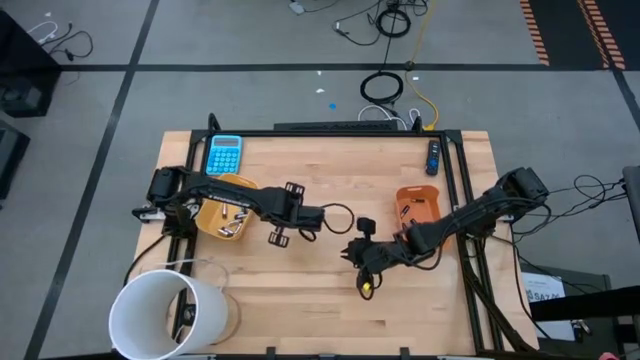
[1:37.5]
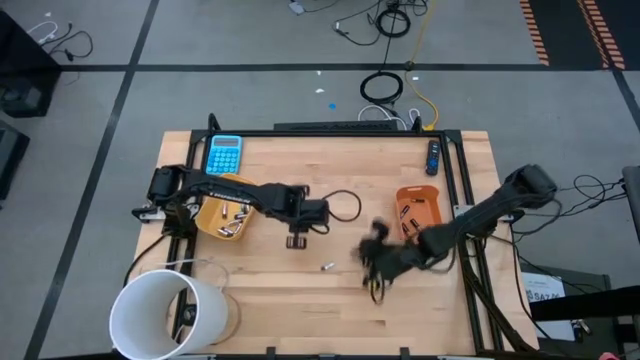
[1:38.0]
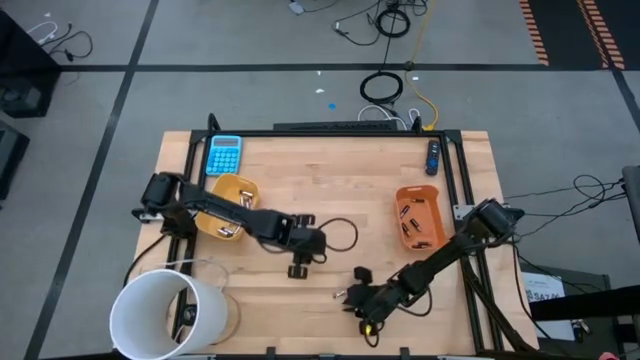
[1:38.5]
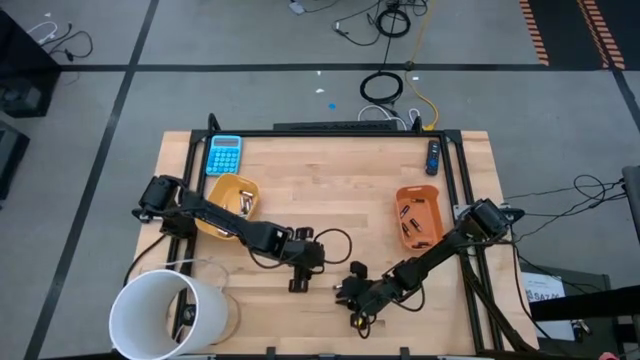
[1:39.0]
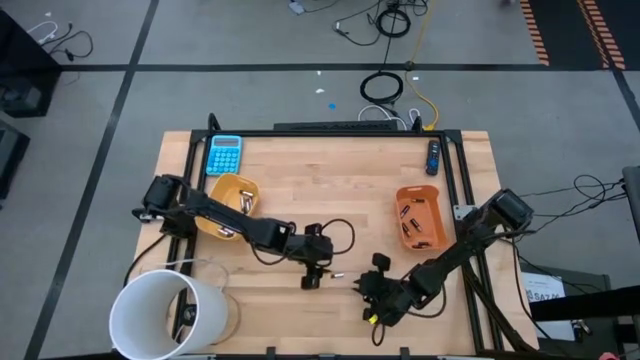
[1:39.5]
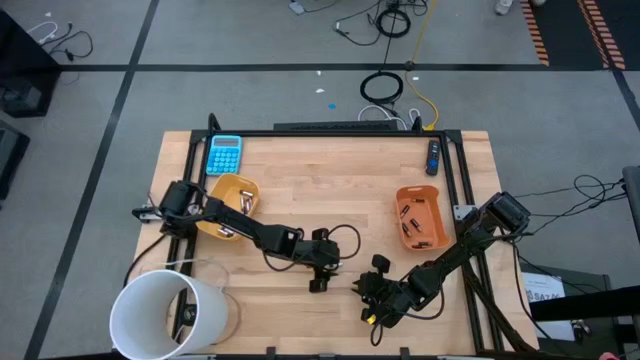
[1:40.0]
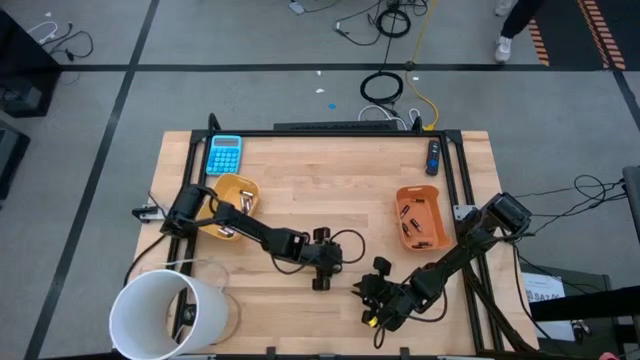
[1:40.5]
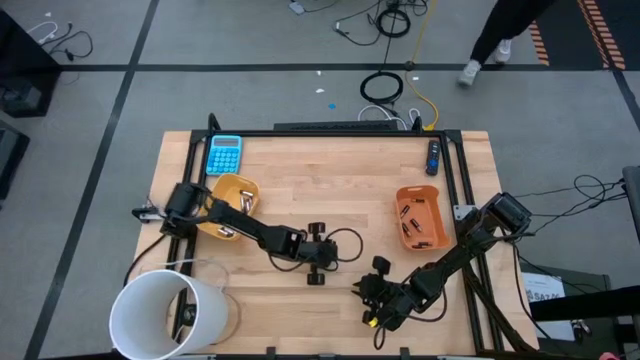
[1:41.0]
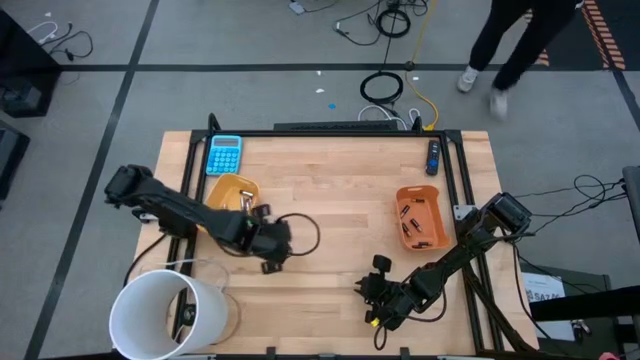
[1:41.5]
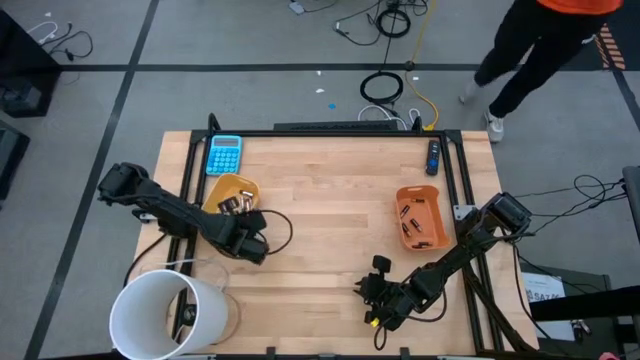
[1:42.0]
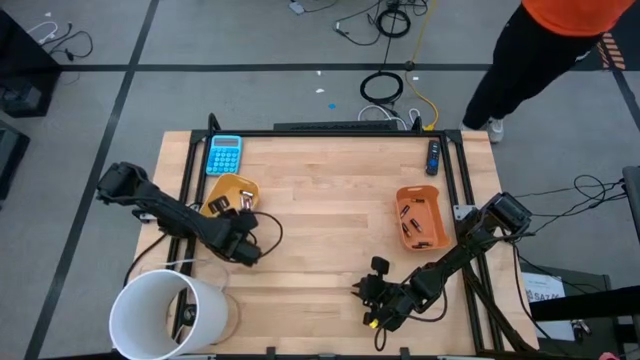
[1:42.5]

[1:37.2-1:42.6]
Task: Sort batteries
Put the silver battery into the yellow bin

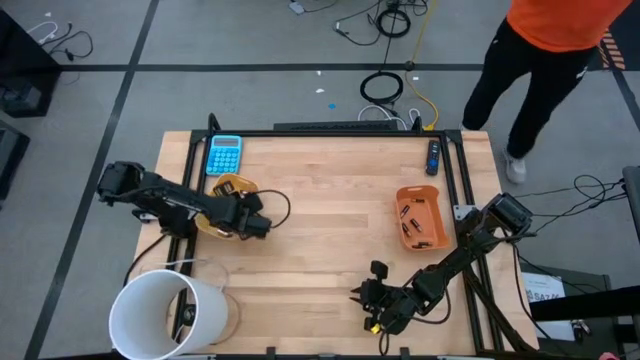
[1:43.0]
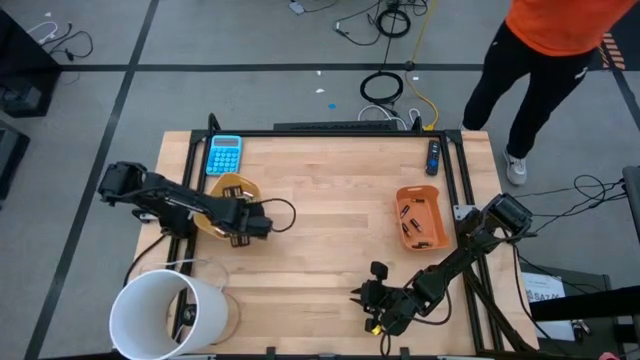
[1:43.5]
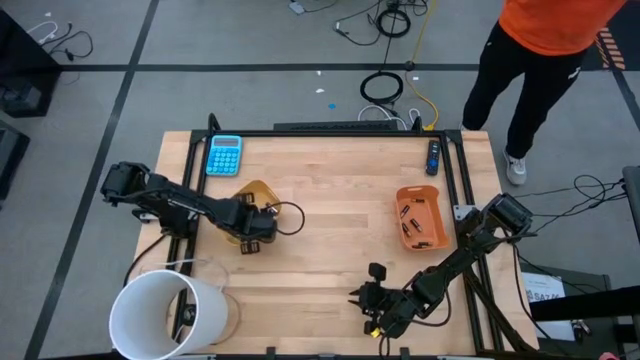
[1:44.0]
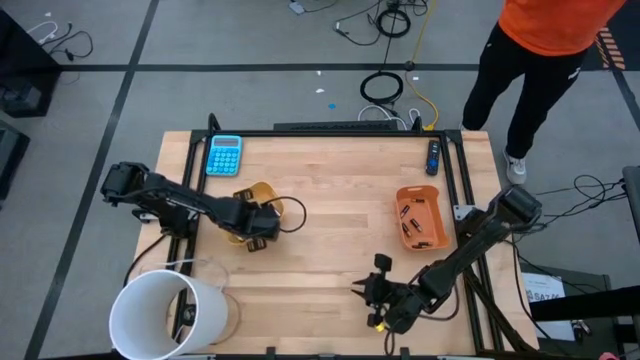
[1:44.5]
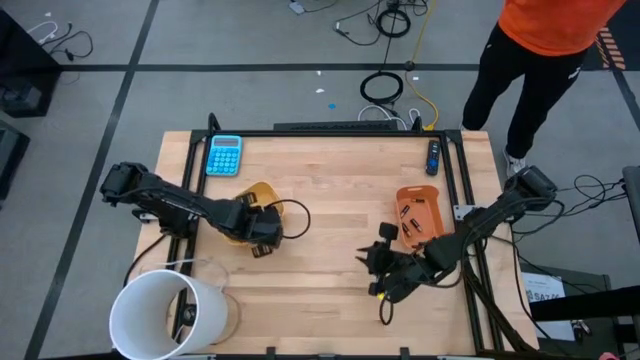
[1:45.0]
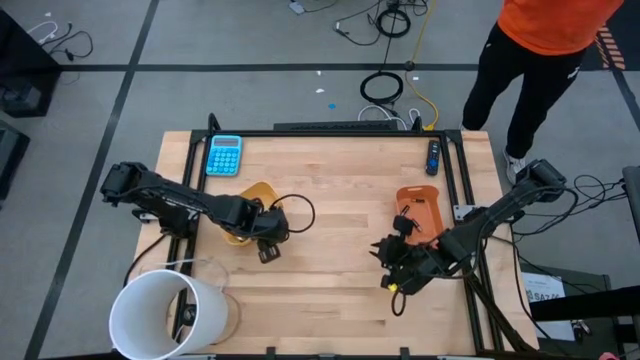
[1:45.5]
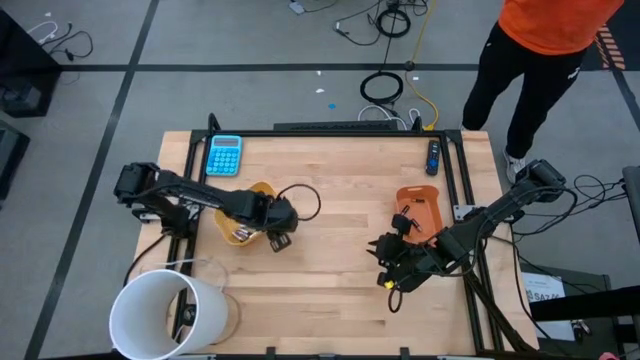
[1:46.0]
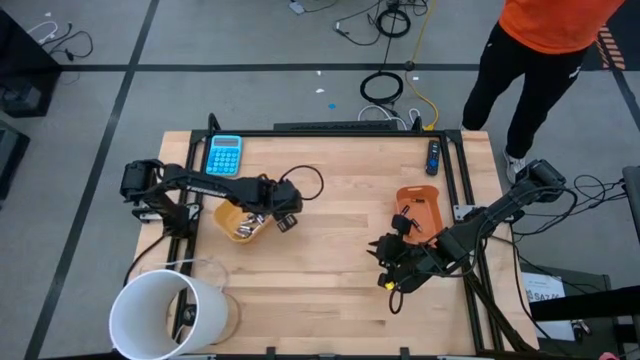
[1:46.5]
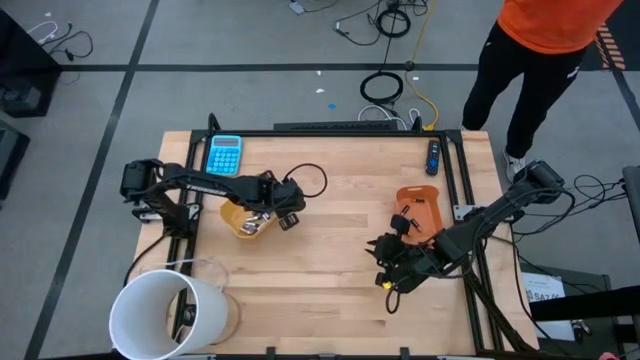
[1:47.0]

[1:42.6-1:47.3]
Adjust the yellow bin

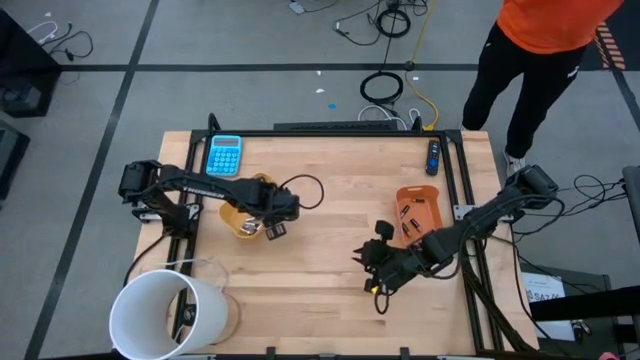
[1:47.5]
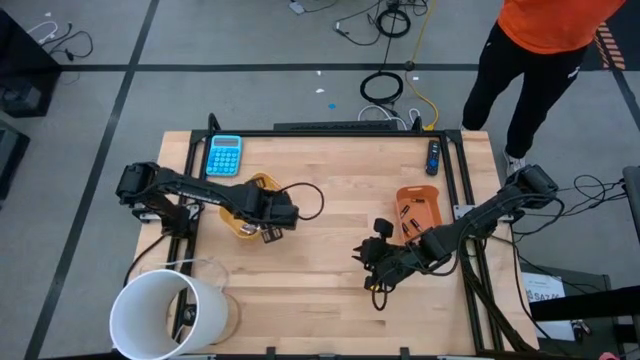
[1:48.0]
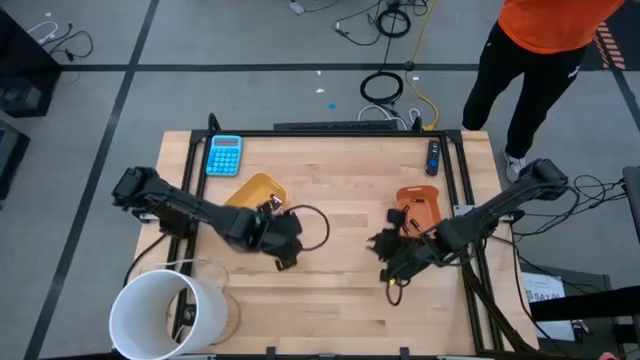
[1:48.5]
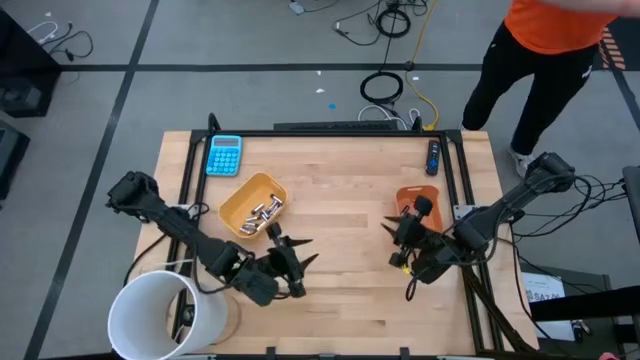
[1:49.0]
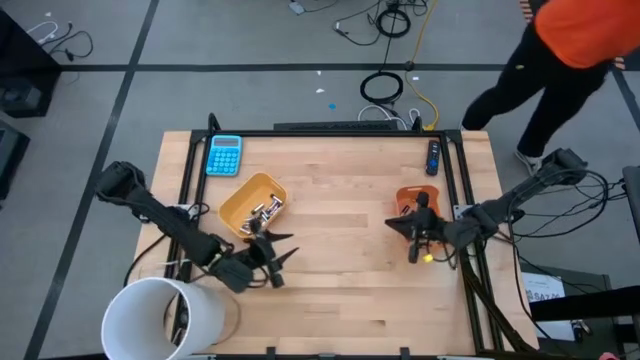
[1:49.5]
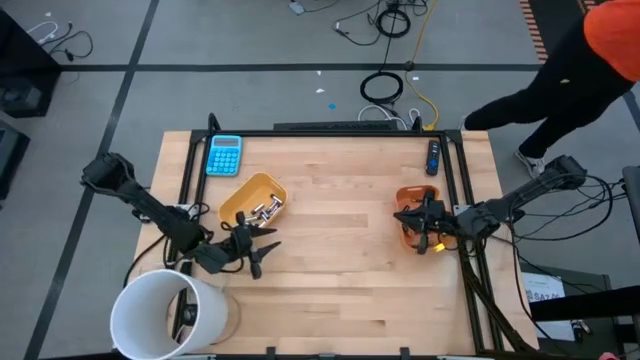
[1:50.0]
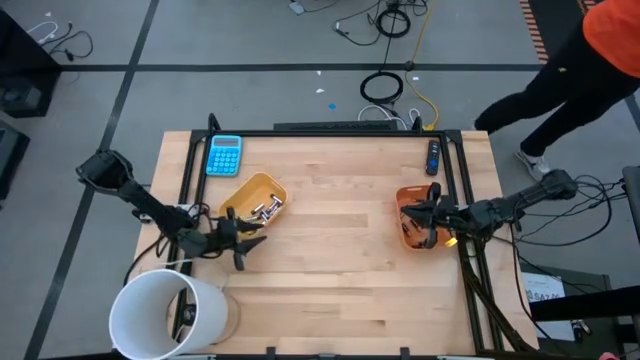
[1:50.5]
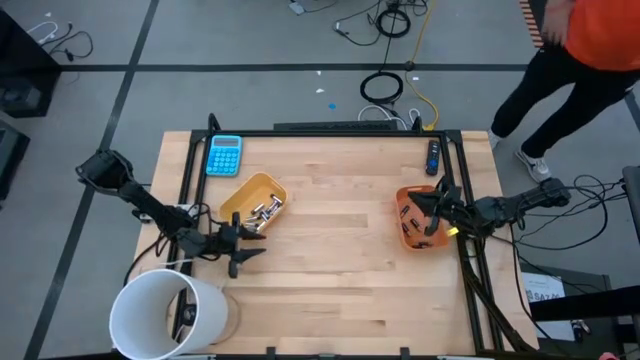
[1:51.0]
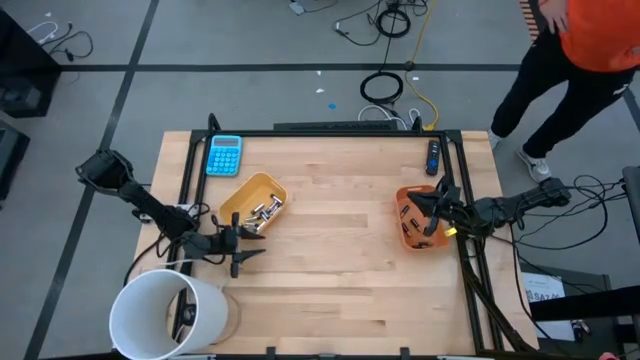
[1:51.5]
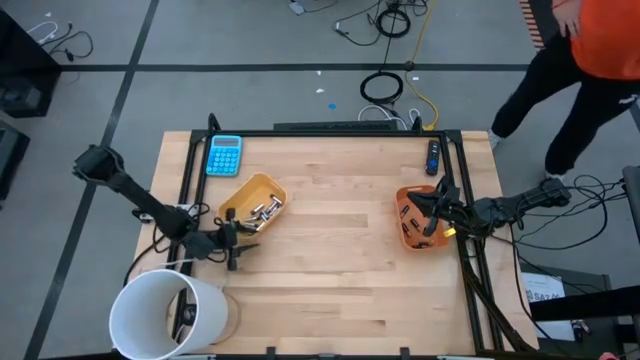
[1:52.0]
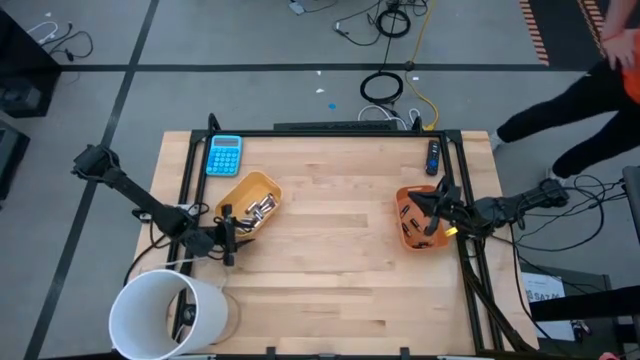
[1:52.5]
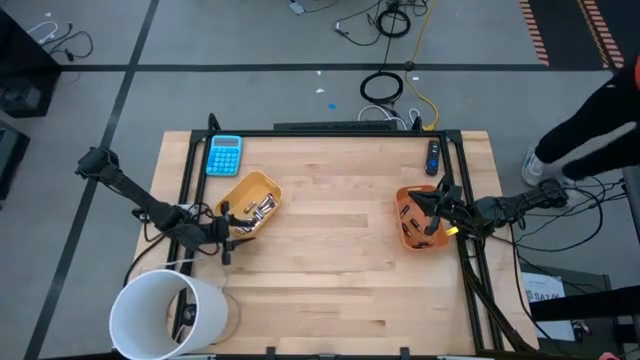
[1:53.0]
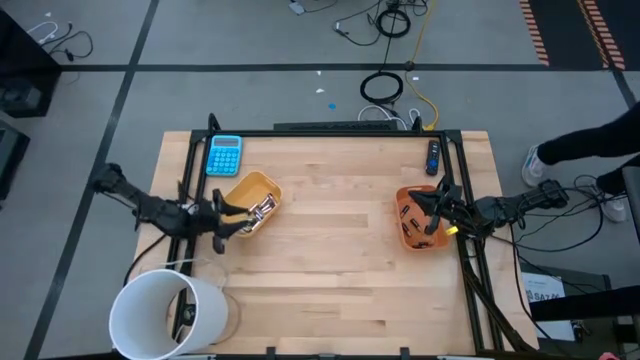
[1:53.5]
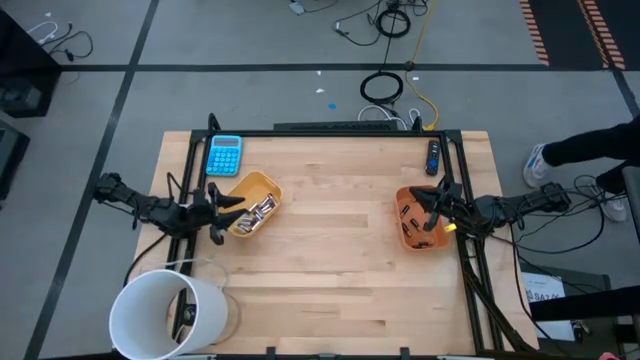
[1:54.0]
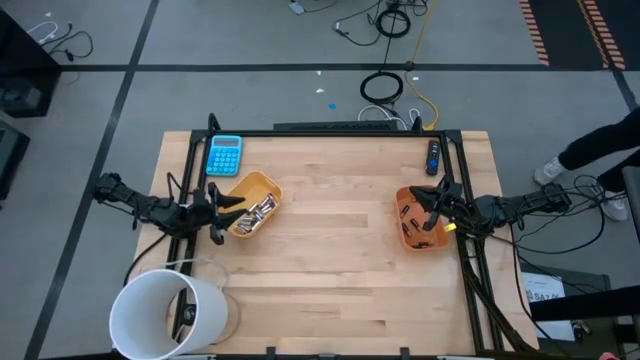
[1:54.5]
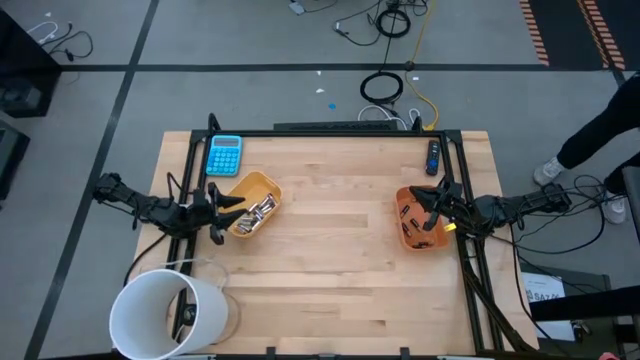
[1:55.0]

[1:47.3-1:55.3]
Return to Home Position

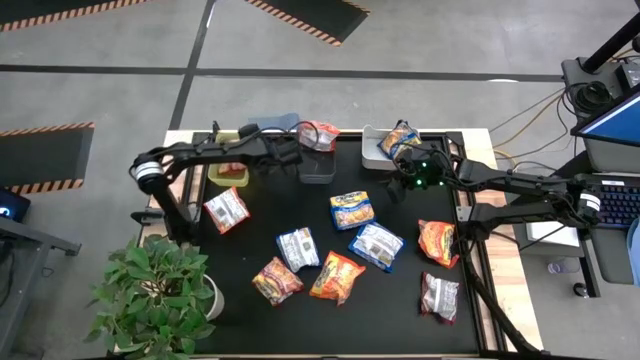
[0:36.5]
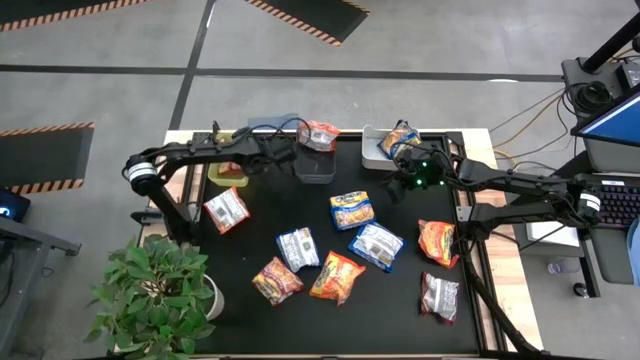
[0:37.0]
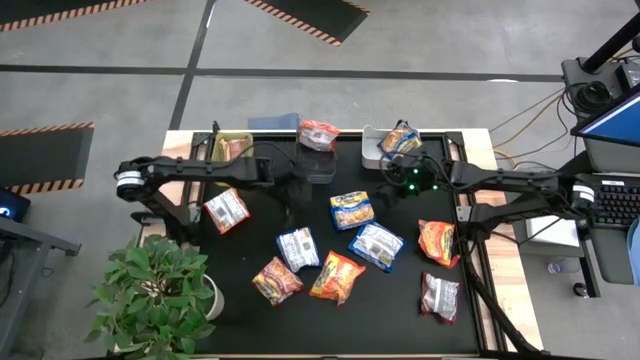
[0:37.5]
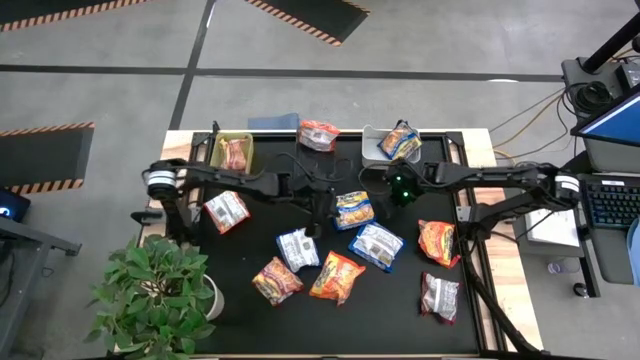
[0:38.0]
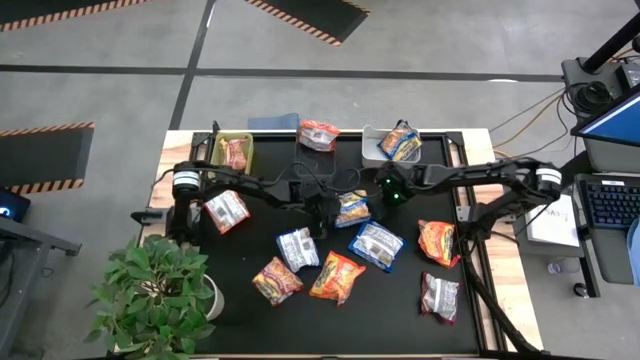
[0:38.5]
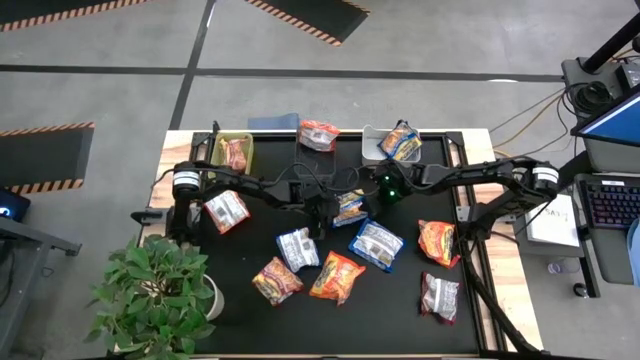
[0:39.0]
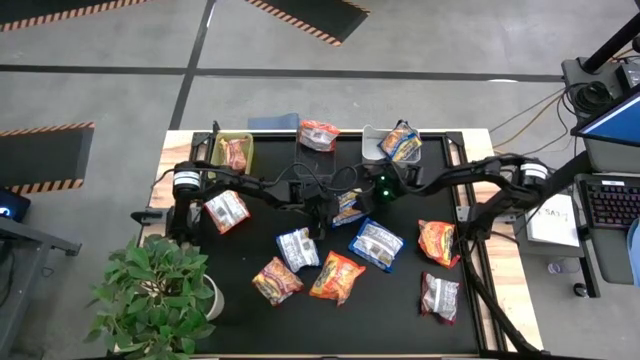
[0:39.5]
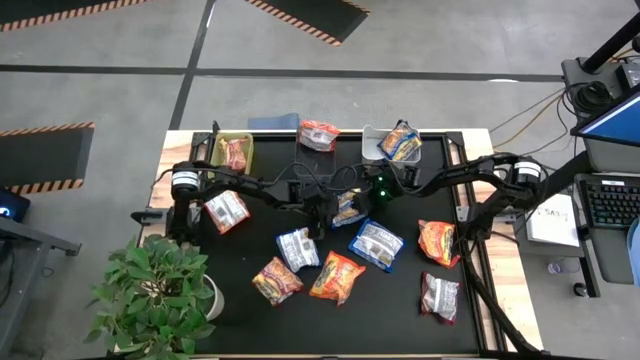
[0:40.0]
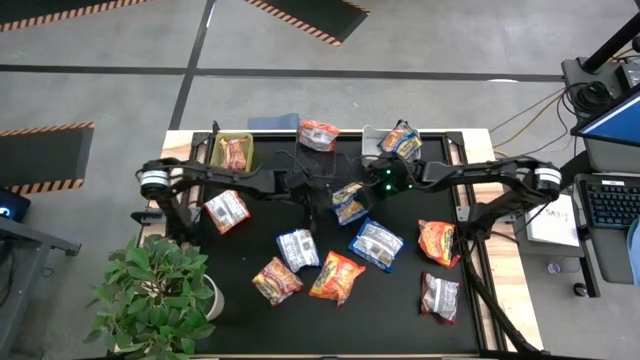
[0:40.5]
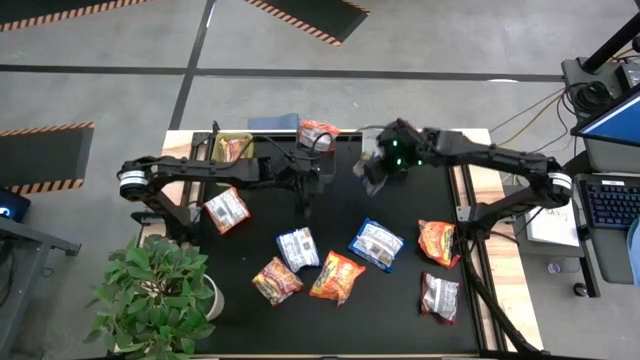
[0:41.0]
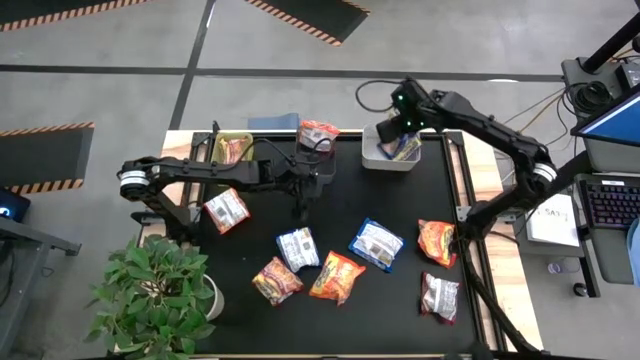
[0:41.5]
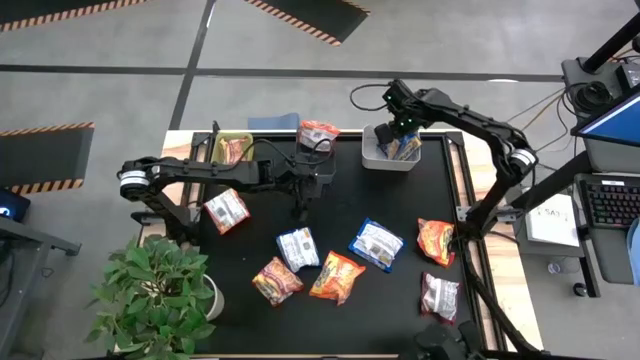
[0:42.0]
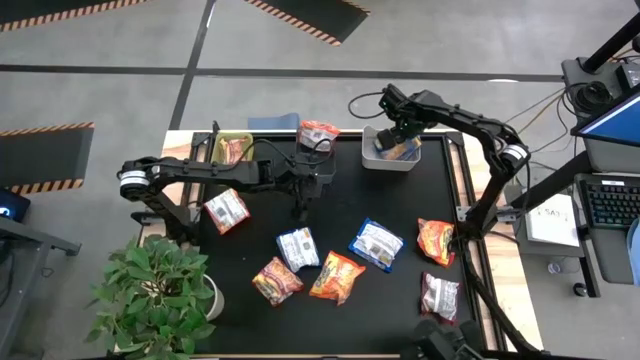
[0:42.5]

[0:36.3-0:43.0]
Task: Sort Maruchan noodles
Put the blue noodle pack into the white bin
